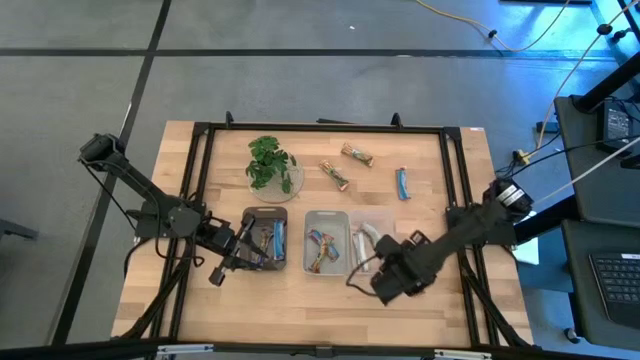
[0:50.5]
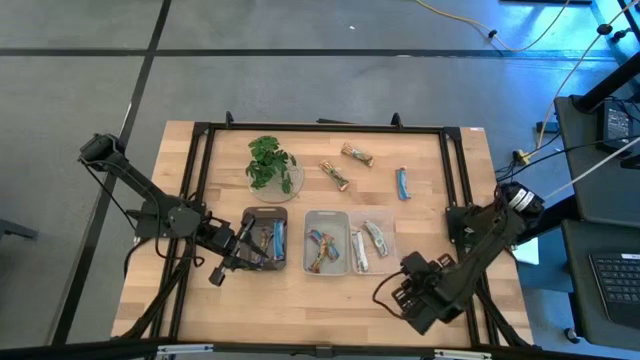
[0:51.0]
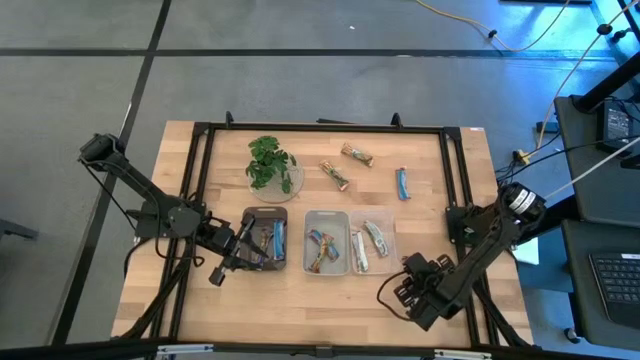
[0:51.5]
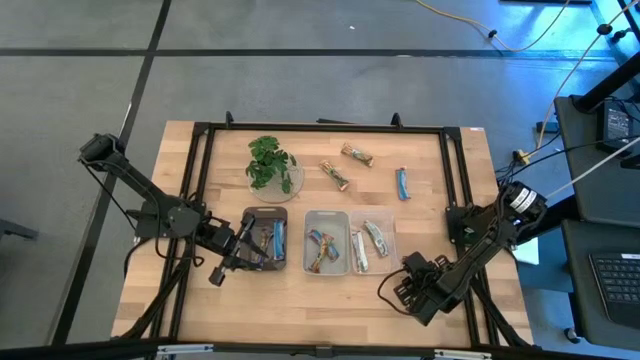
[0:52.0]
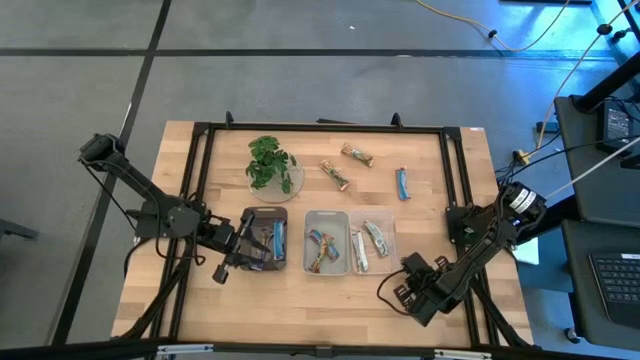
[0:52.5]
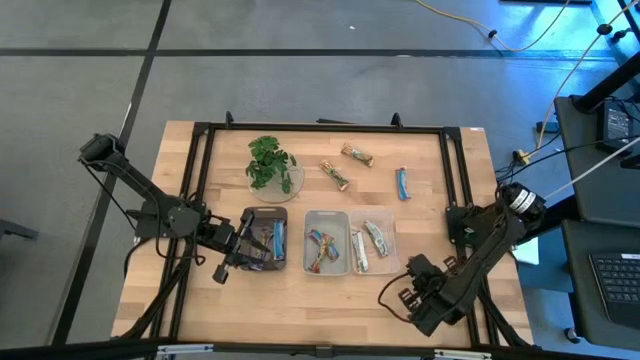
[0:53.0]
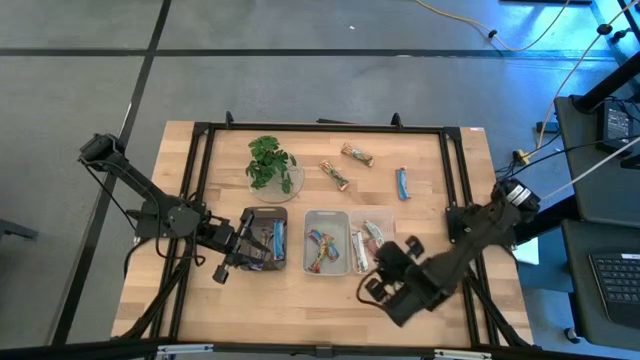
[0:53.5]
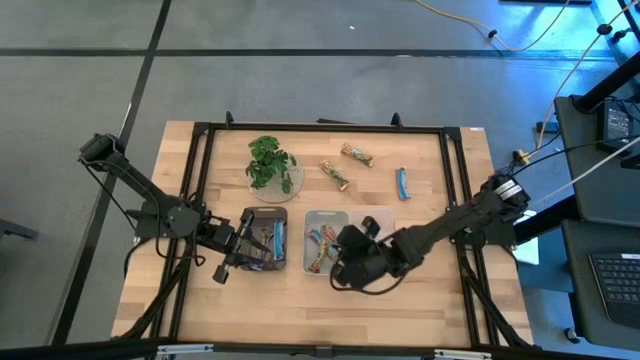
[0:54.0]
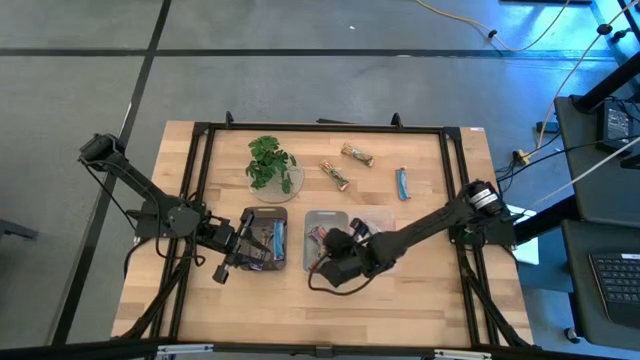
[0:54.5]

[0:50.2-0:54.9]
Task: Pick and place Granola Bars by type
Put the red granola bar into the grey bin

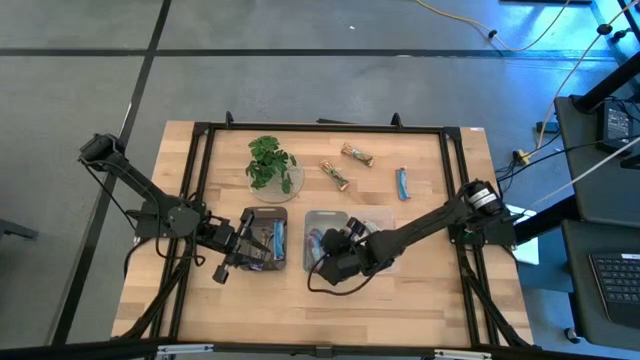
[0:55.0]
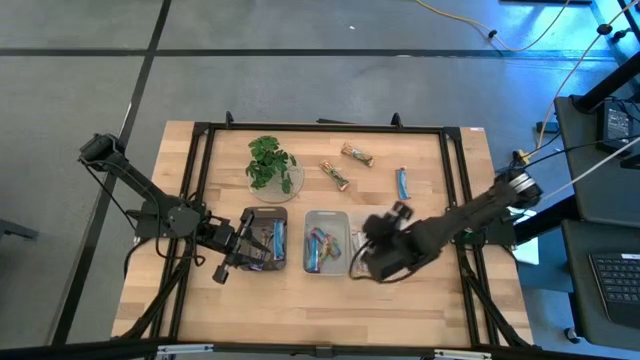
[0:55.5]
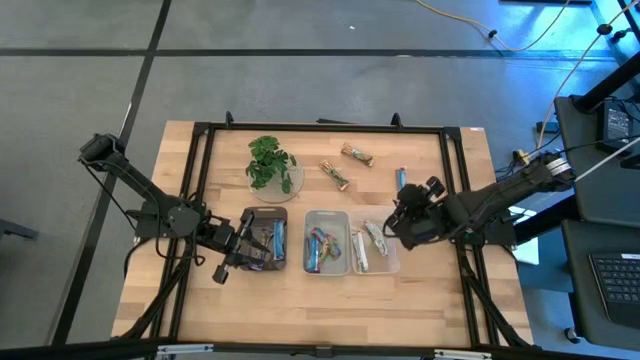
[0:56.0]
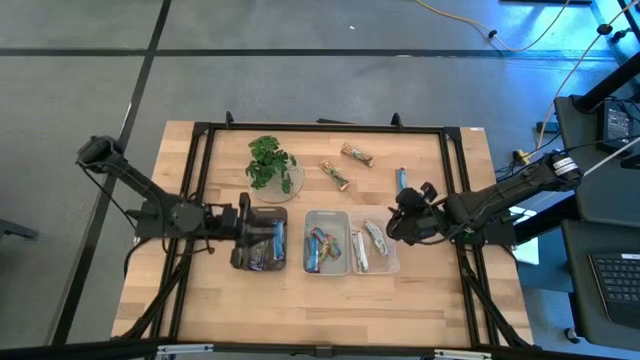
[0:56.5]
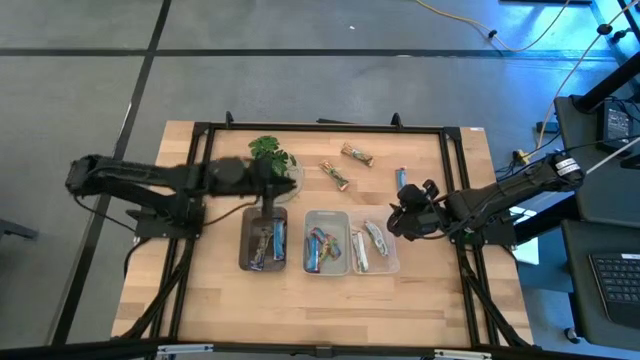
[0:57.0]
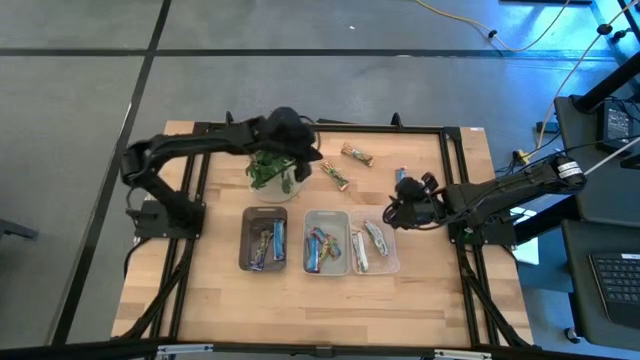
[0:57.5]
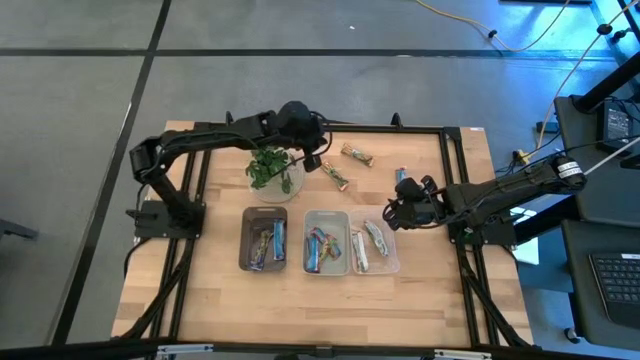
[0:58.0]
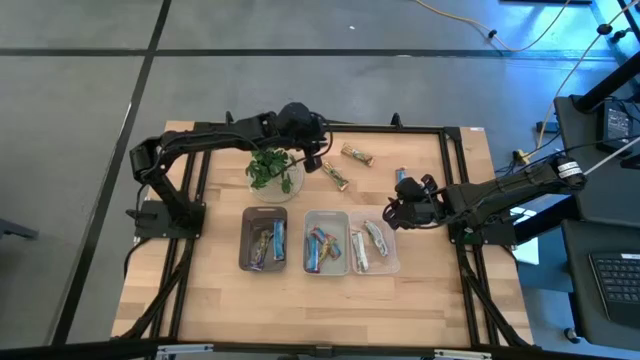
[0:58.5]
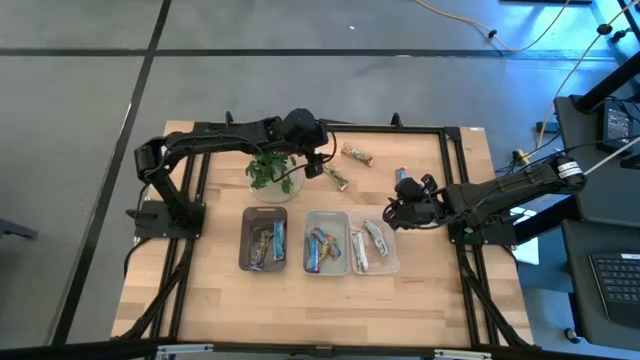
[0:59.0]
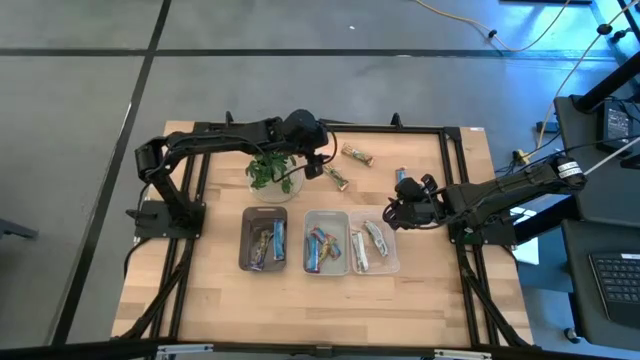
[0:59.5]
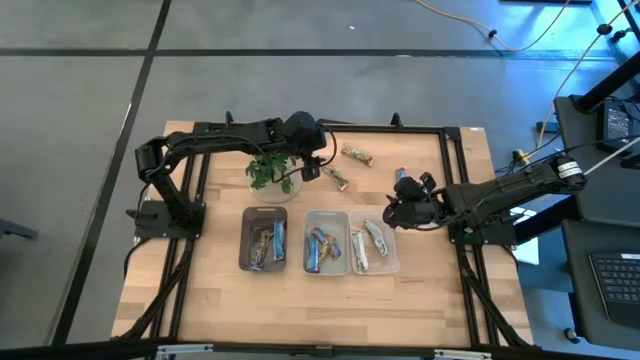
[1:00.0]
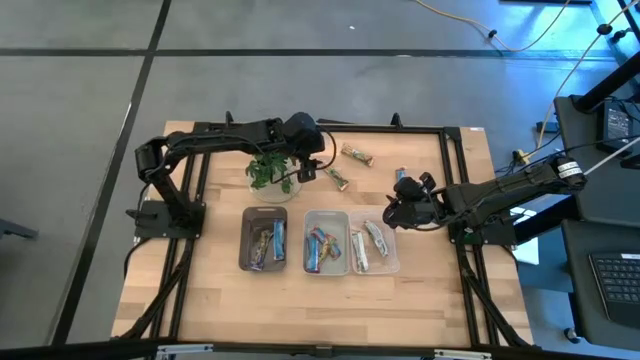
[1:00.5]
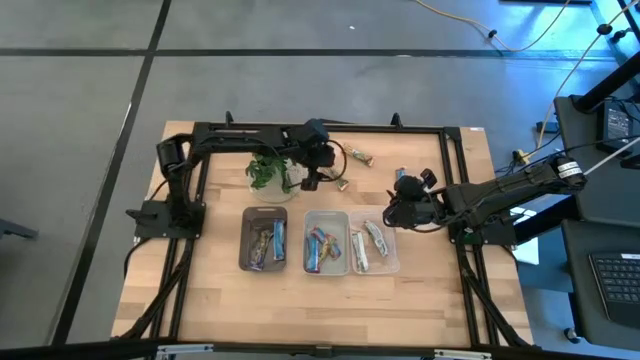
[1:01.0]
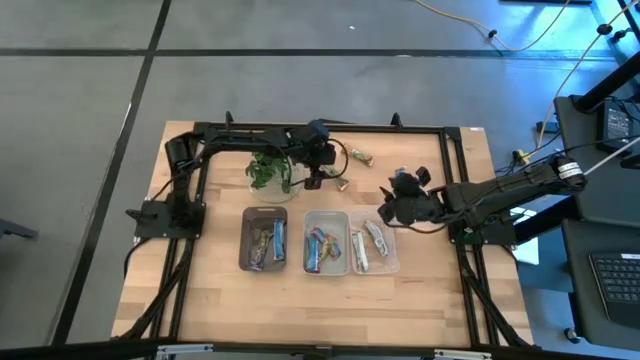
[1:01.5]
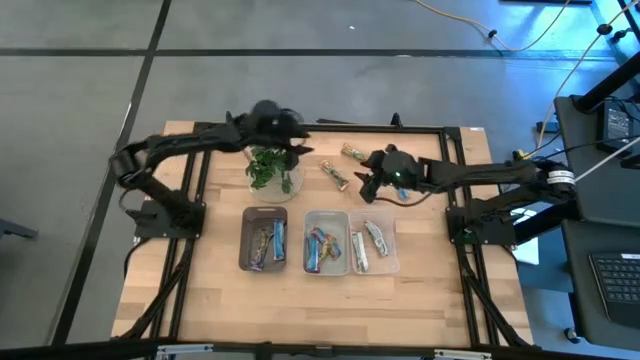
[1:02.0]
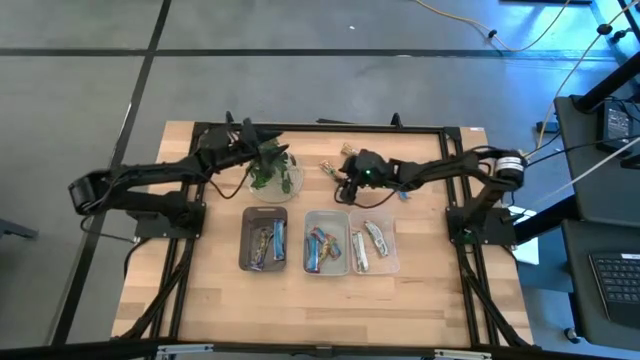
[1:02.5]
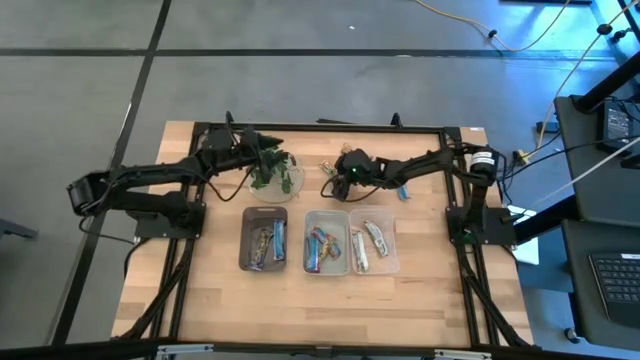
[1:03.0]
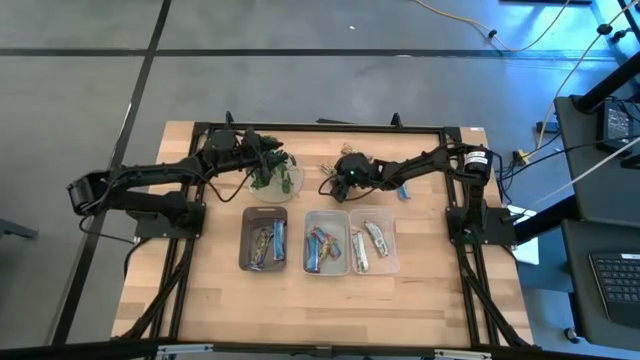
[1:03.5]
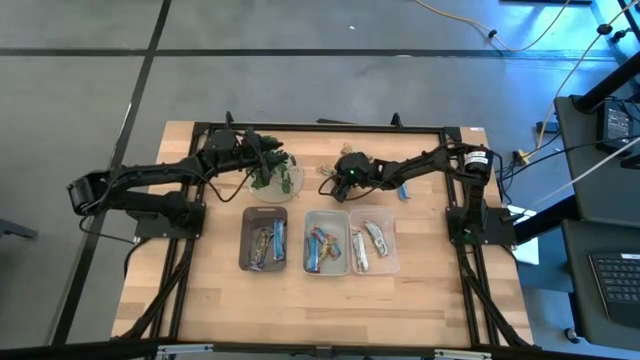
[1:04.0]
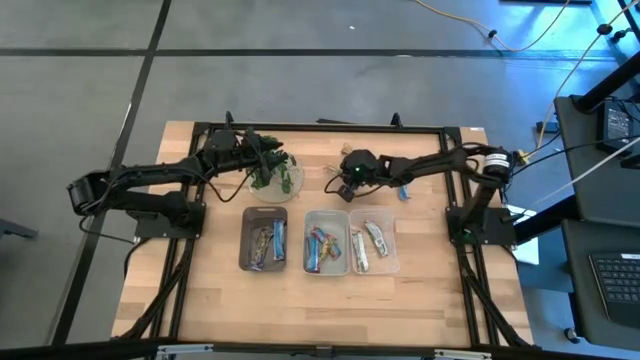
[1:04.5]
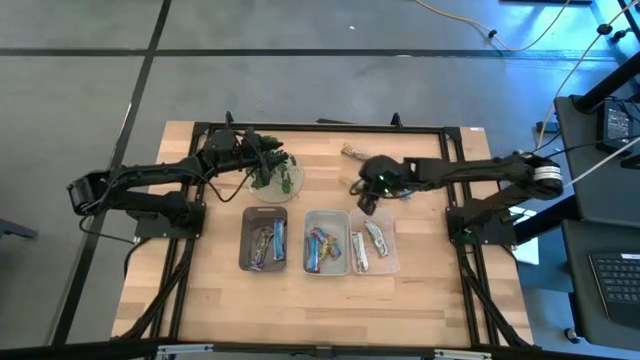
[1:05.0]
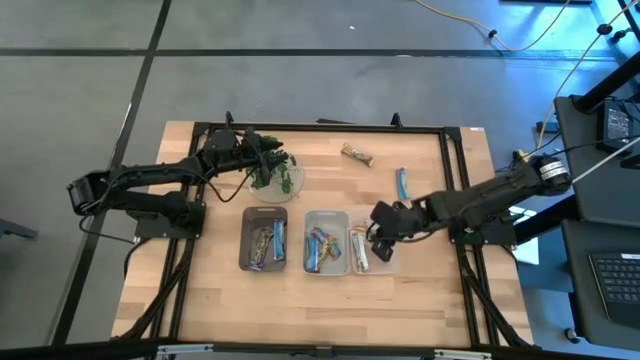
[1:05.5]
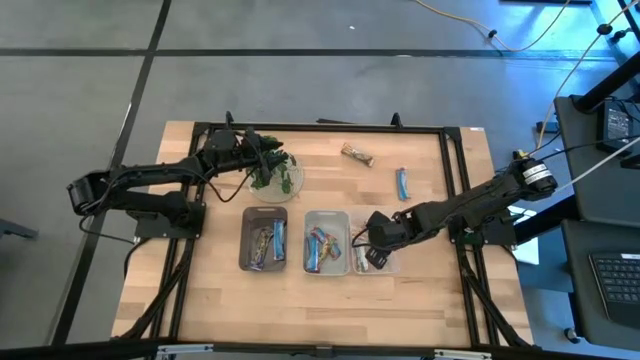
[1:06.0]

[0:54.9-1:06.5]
Put the orange granola bar into the transparent bin

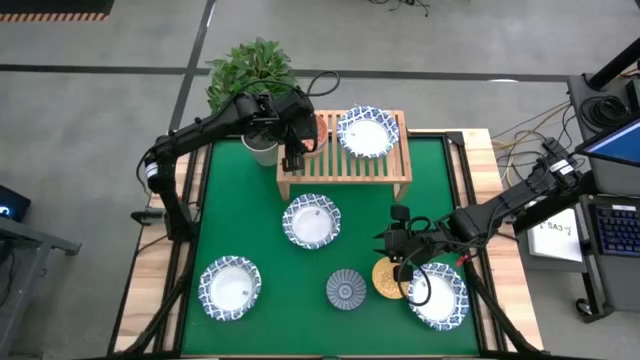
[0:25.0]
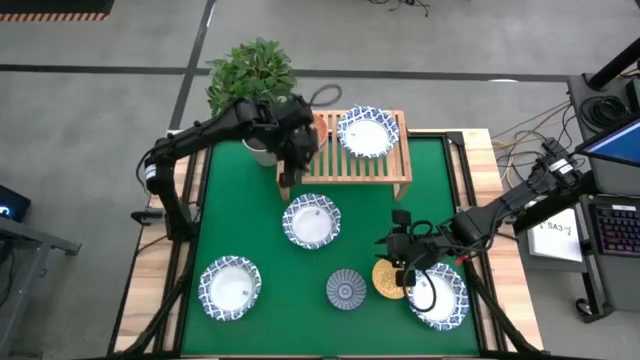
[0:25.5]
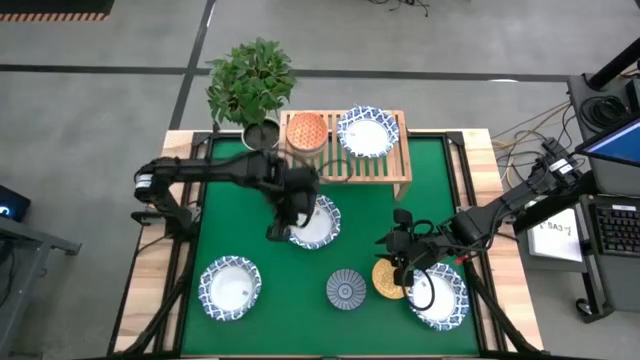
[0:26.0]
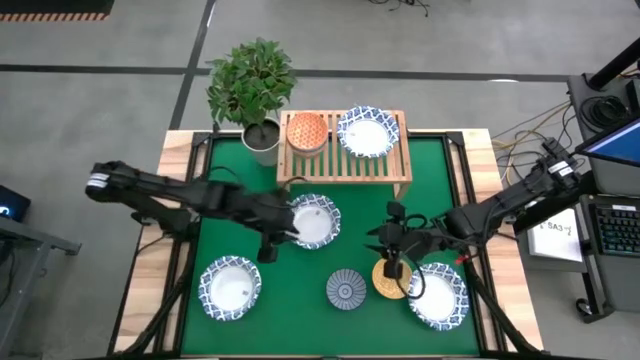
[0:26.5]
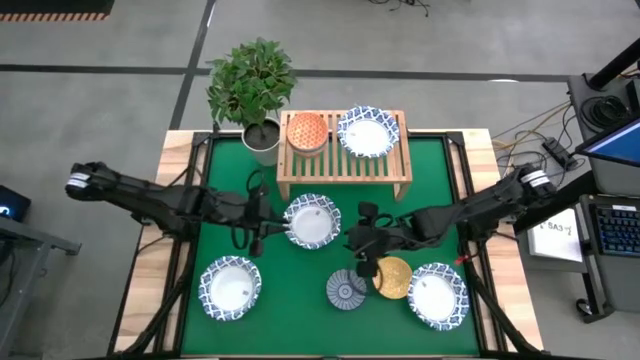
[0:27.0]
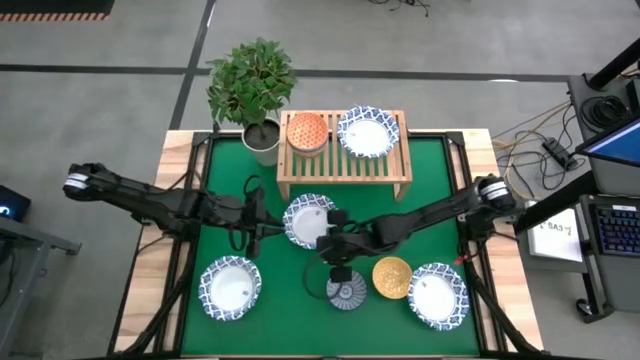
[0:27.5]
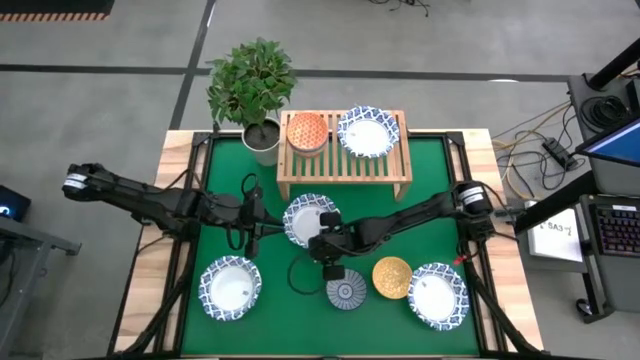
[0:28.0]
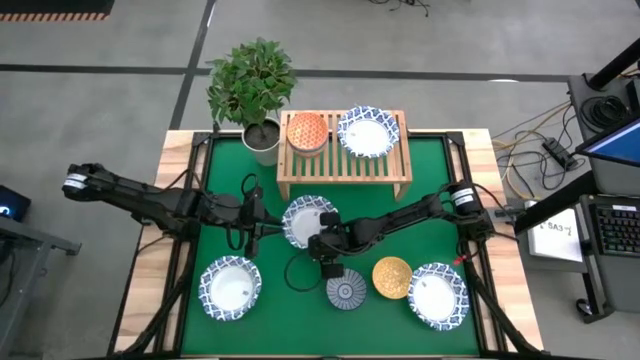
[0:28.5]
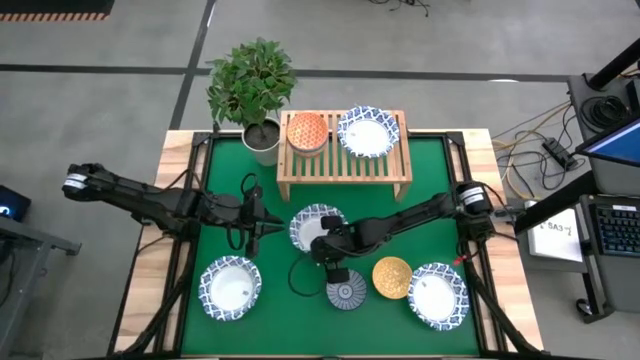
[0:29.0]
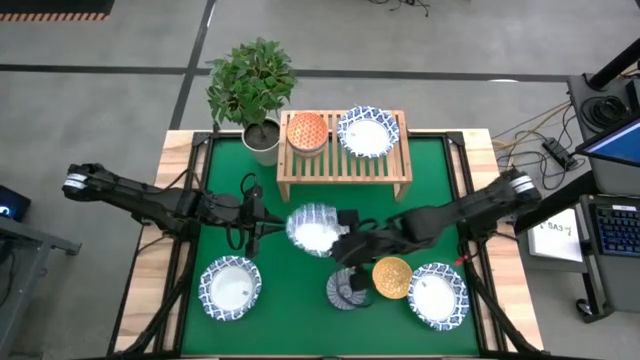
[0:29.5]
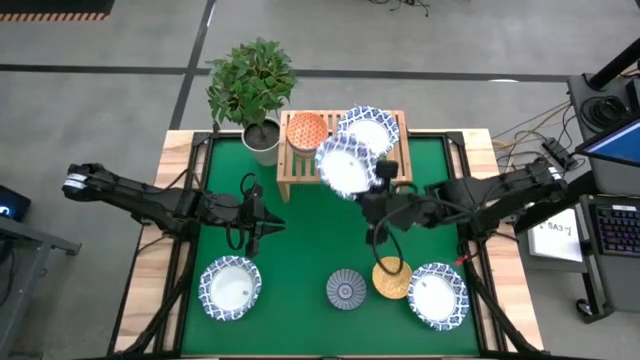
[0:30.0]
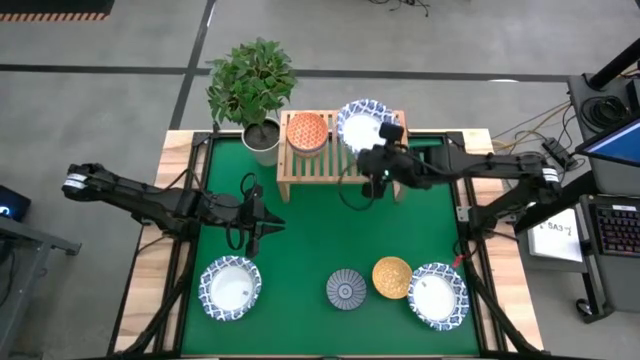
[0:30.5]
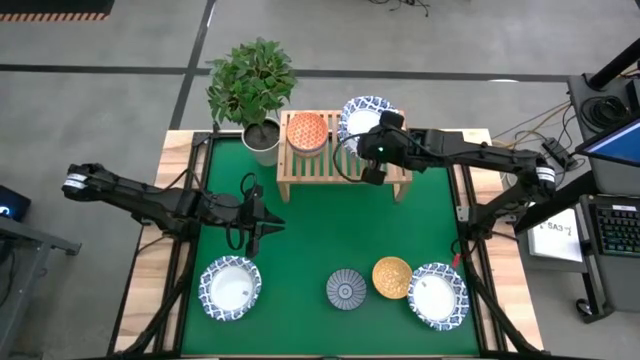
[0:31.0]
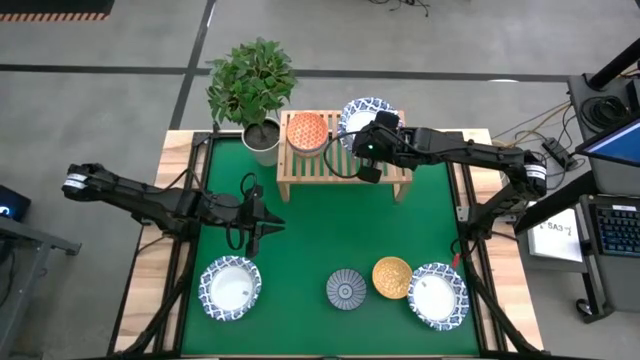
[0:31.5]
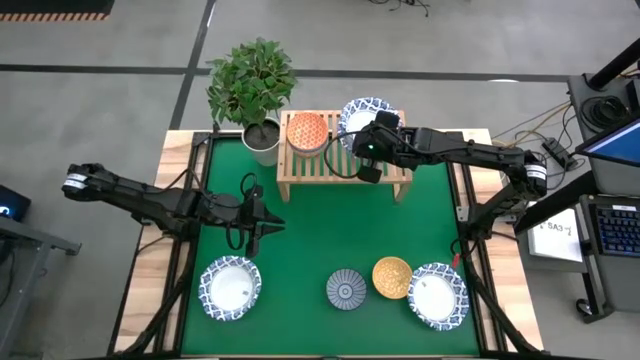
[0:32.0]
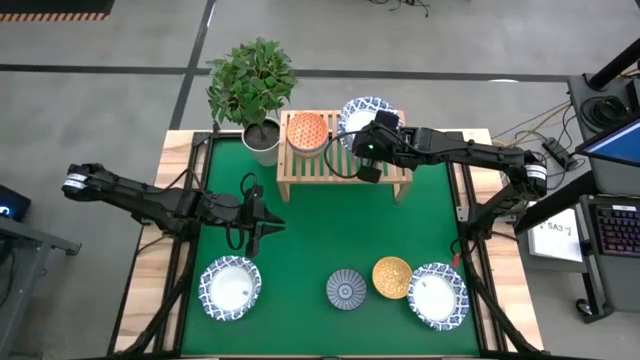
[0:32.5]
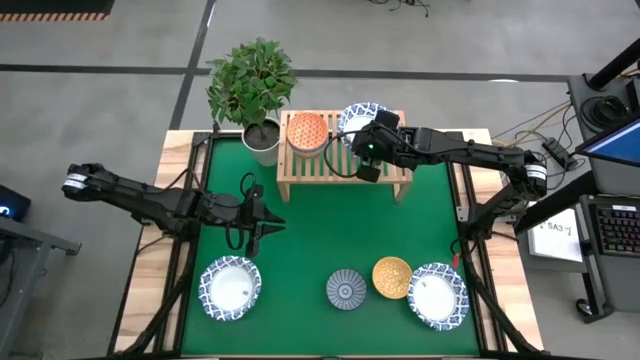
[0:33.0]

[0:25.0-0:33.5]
Task: Place and stack bowls onto a shelf
Stack the blue patterned bowl on top of the blue patterned bowl on the shelf
